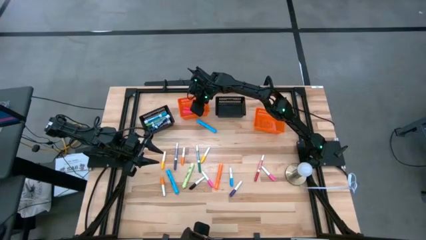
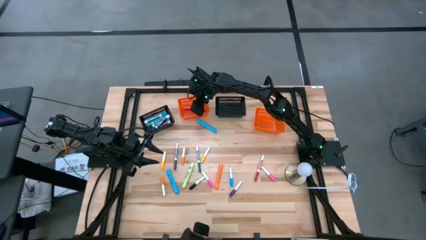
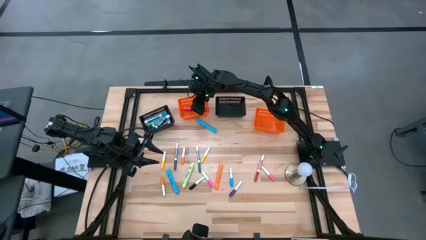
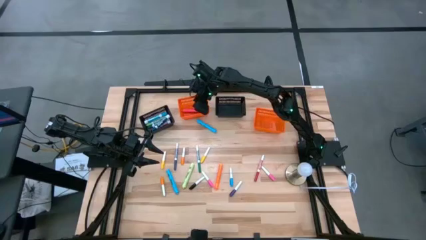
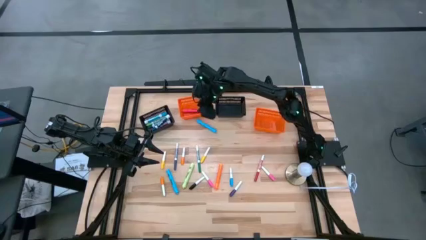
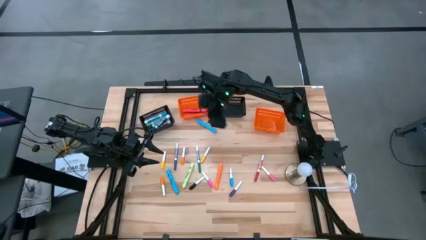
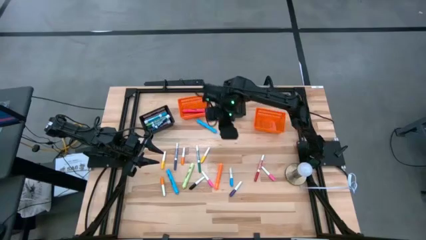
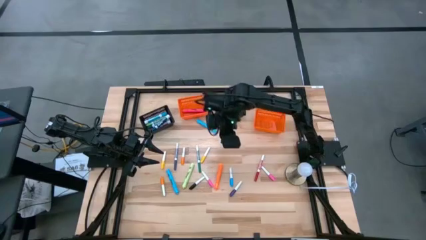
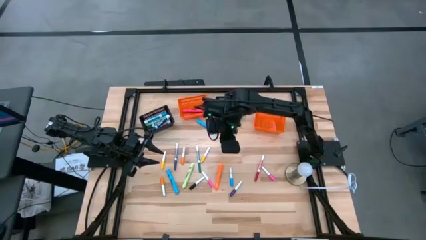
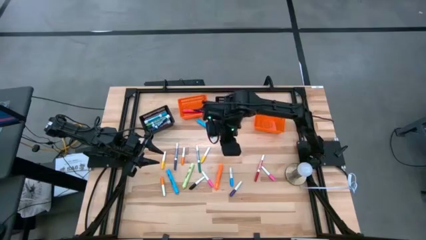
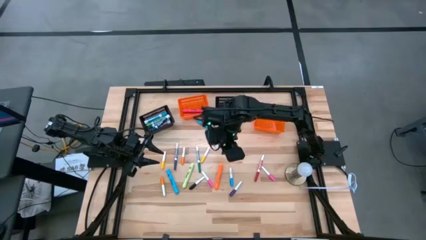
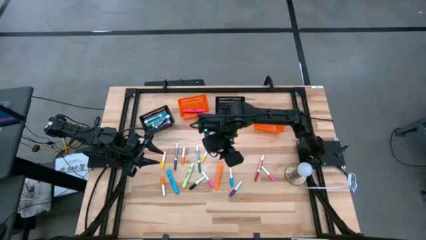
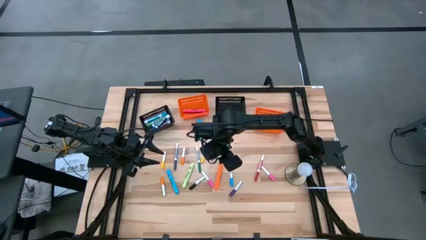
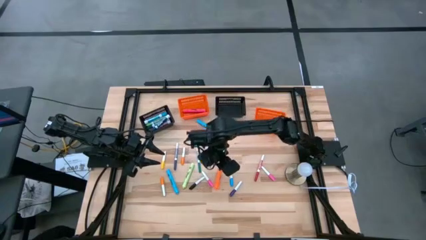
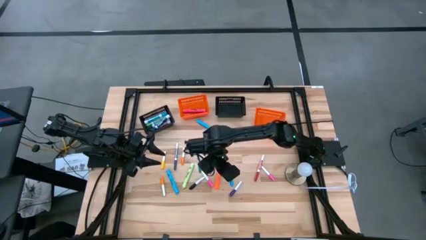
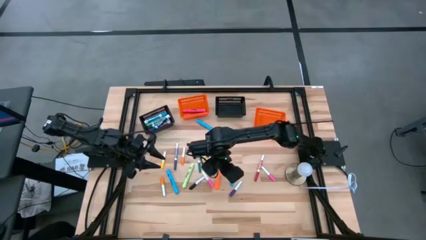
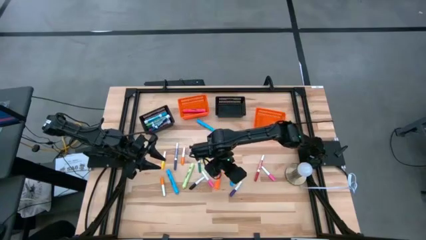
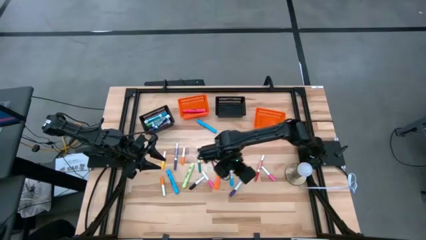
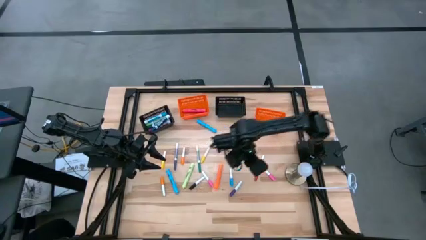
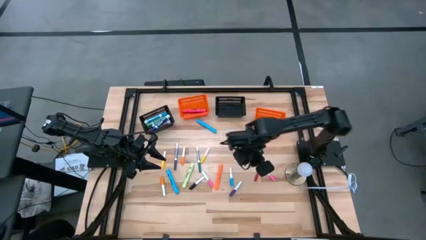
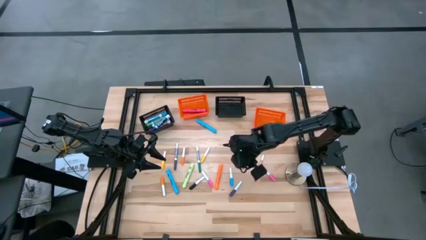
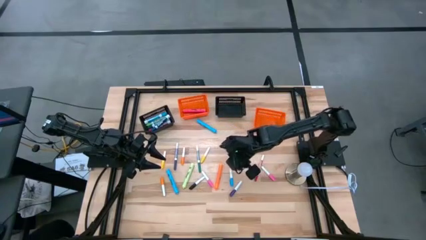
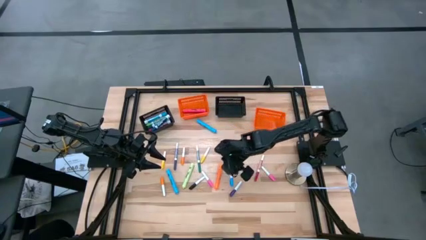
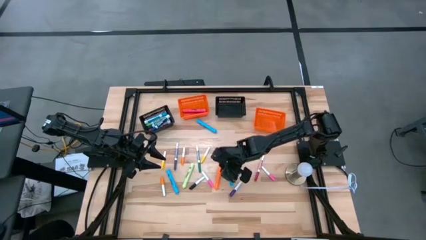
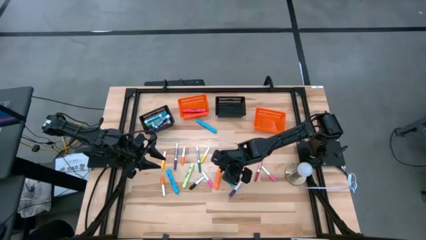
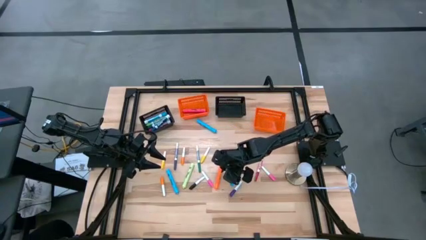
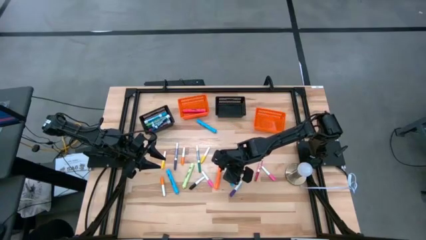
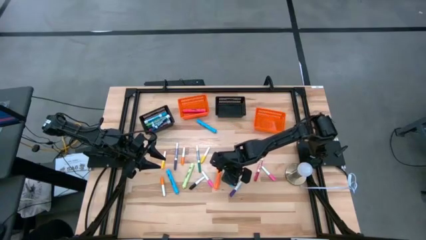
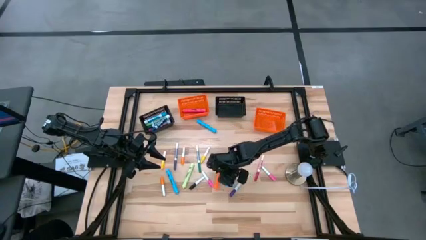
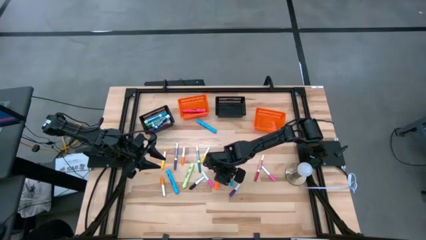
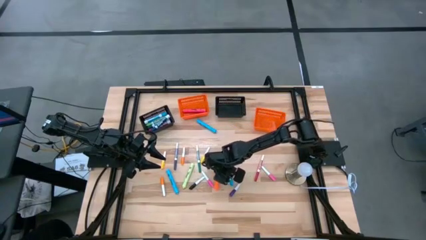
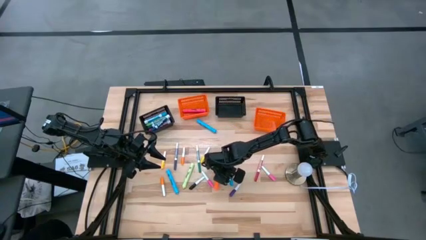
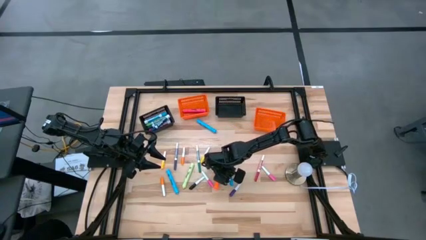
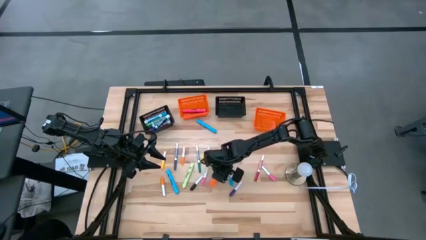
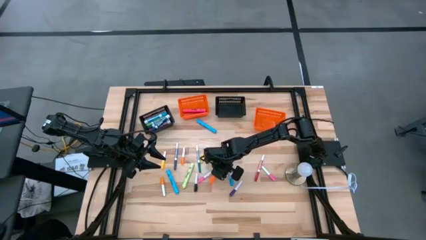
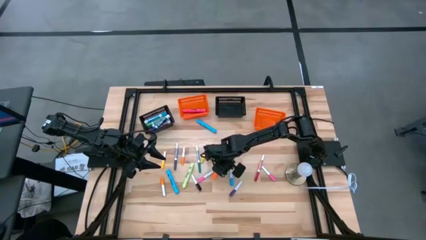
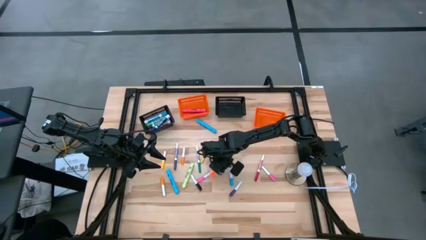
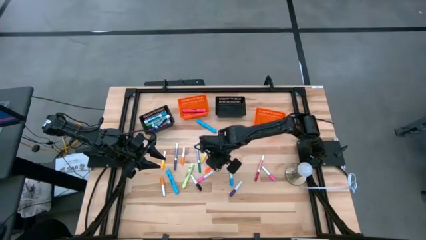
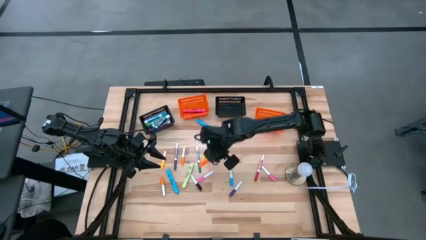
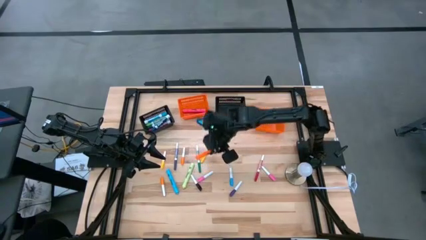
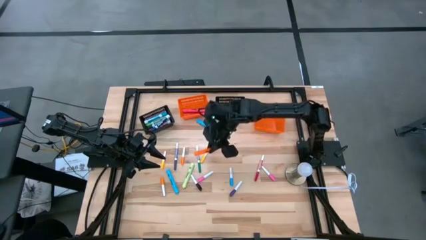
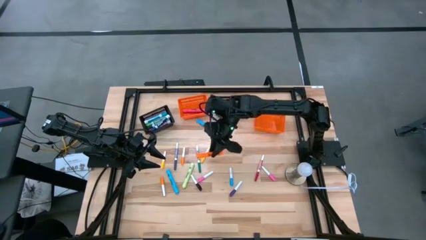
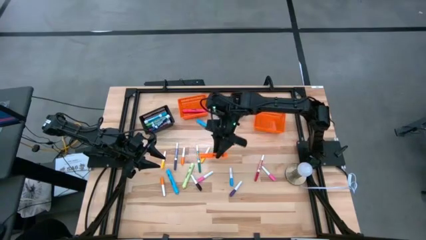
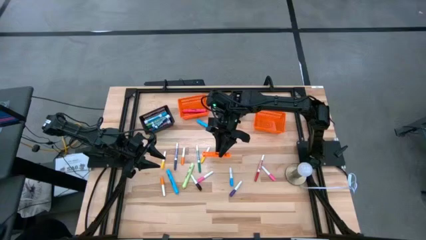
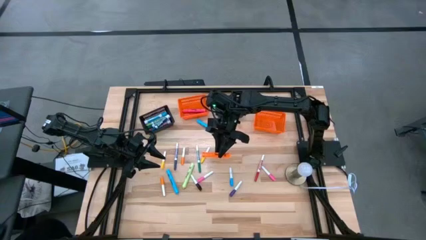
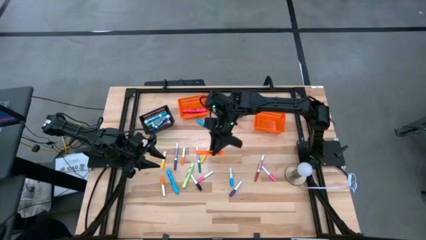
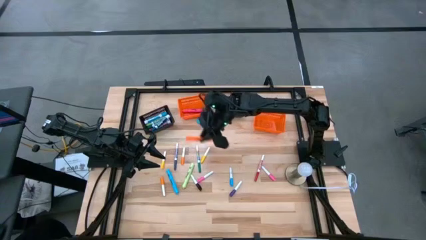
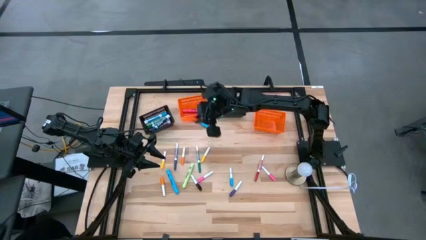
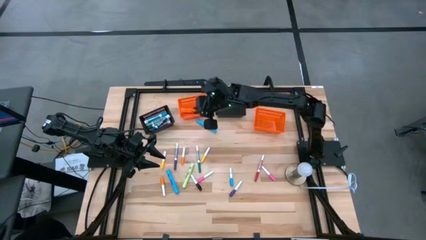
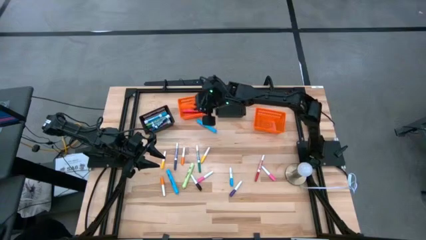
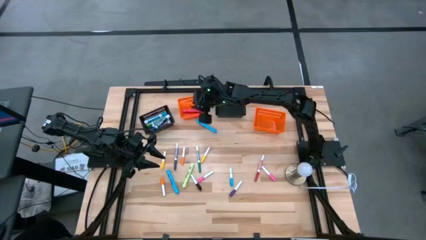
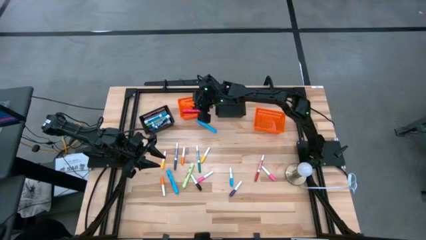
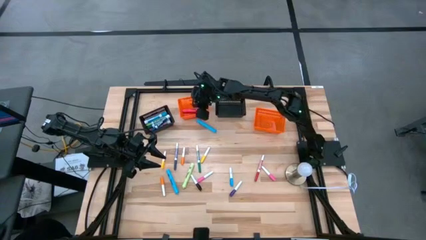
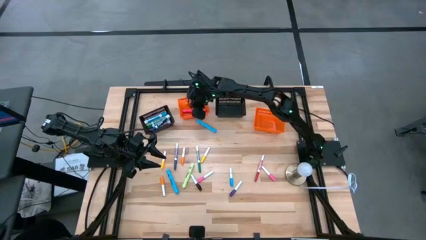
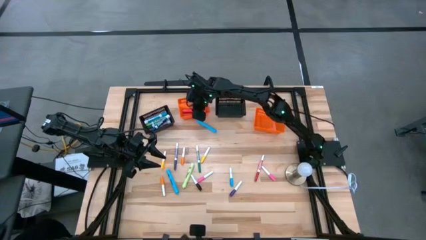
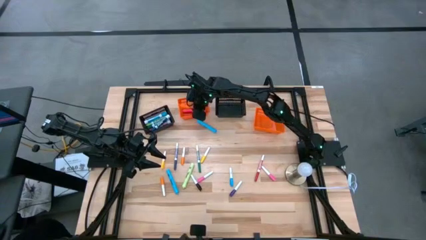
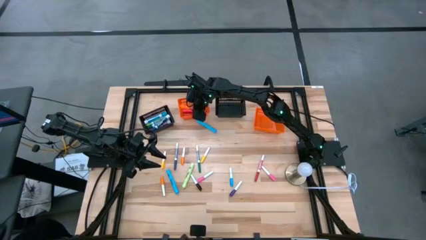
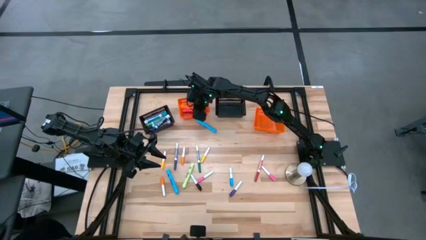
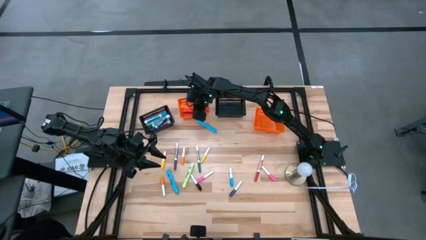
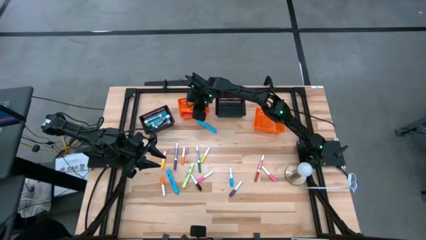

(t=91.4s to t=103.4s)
Task: Pick & Place Markers
Put the large orange highlighter pen into the left orange bin

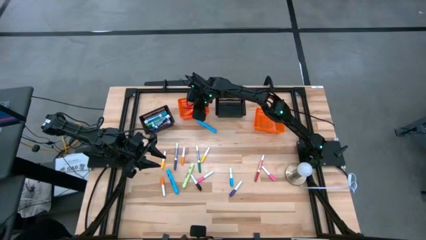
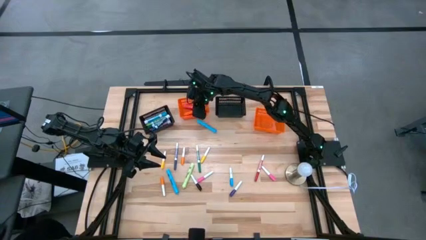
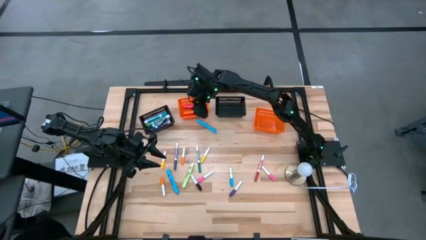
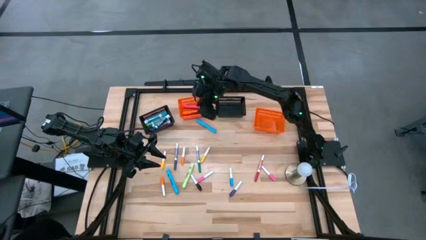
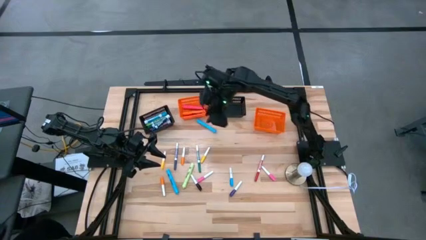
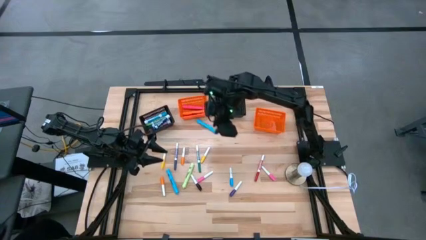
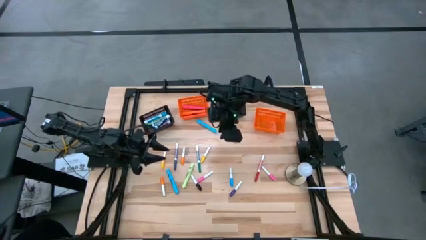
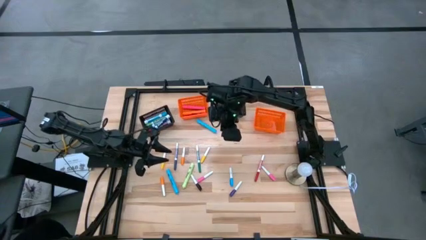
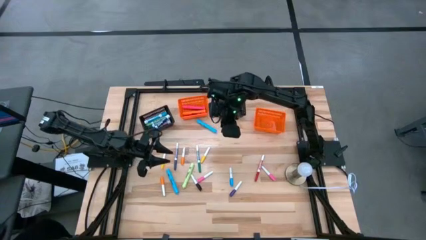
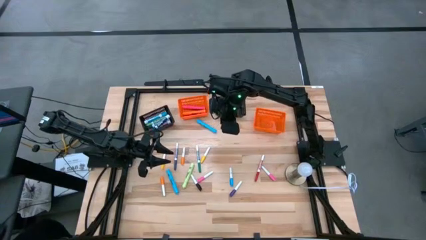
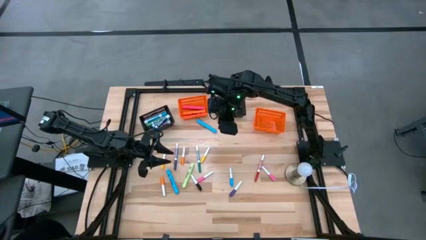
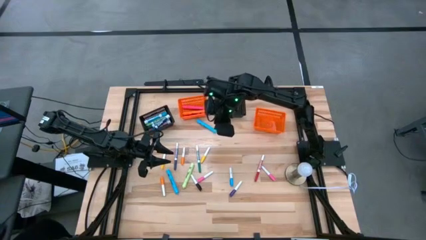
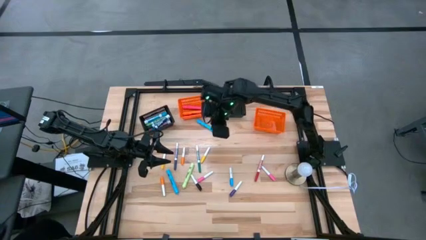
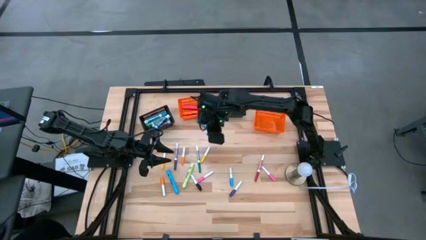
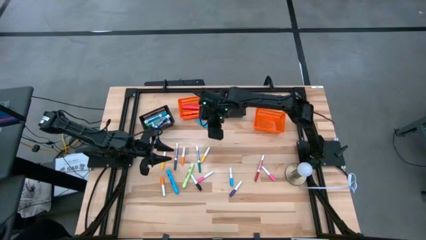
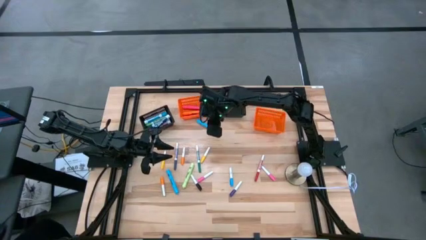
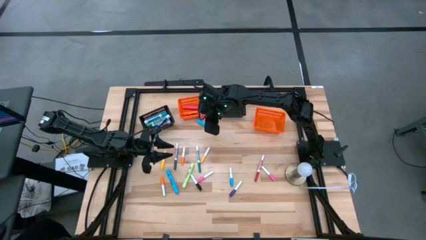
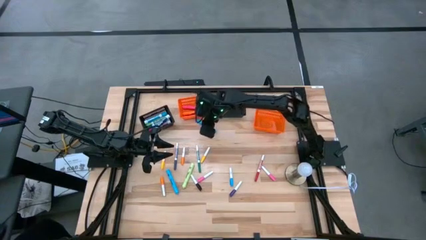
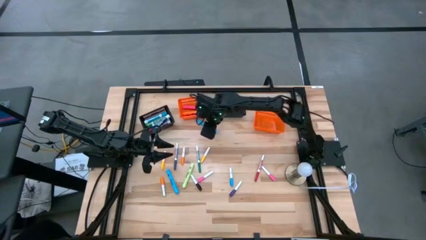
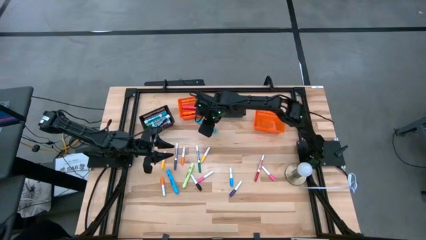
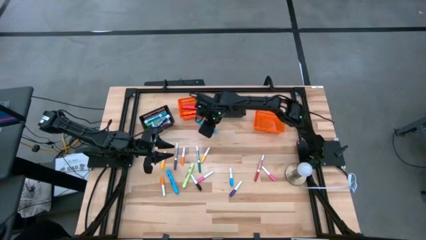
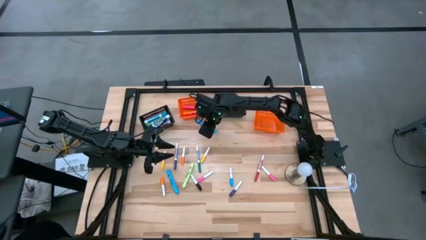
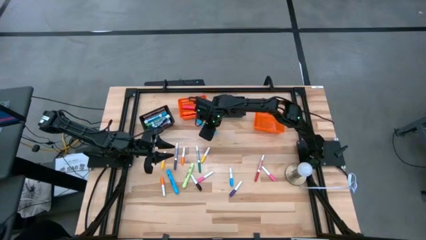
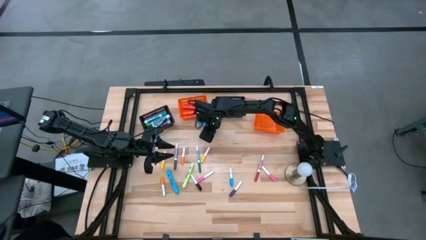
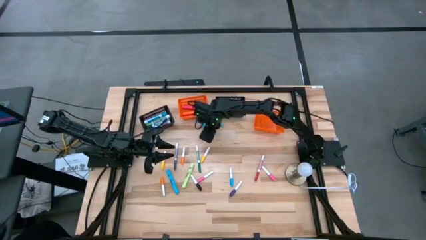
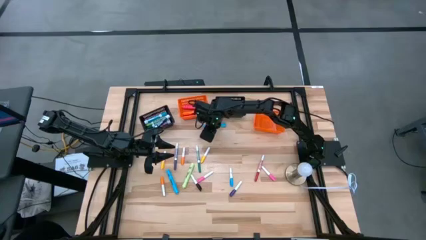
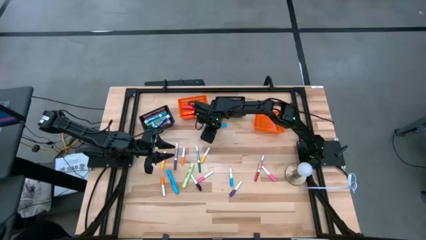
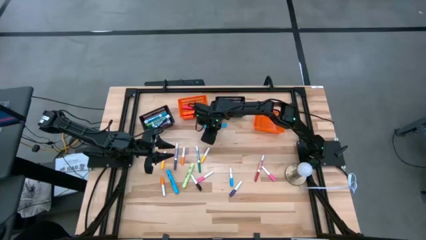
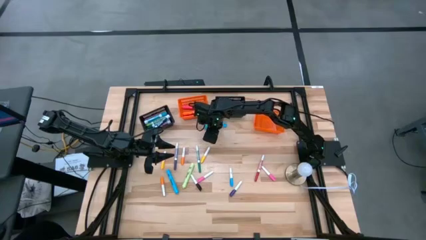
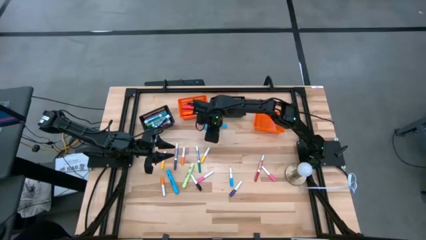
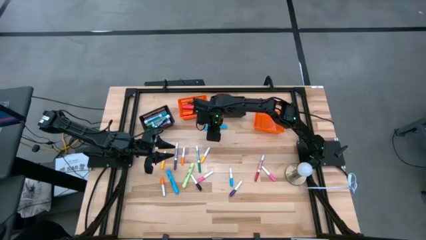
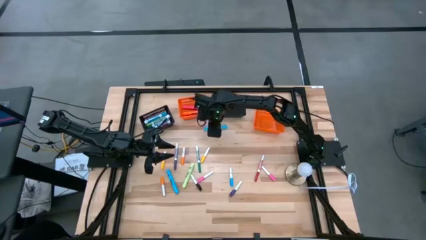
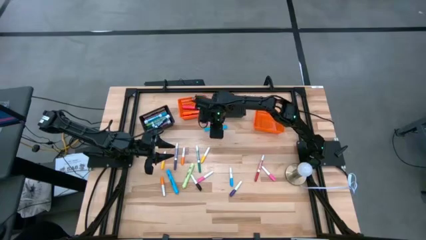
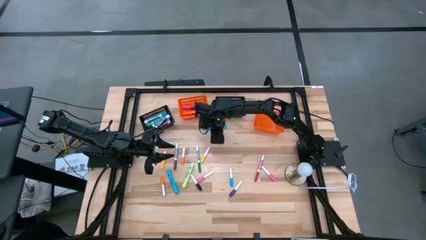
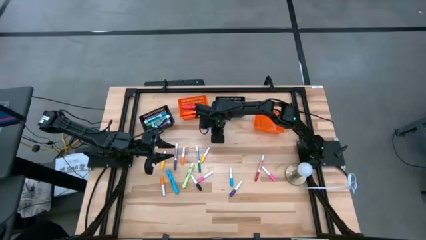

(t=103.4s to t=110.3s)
Put the top large light blue highlighter pen into the left orange bin
